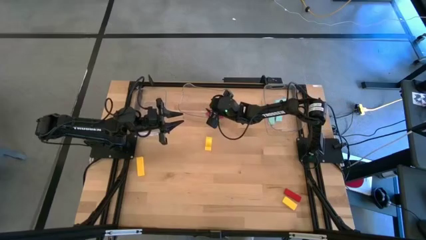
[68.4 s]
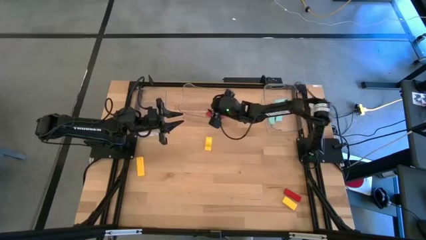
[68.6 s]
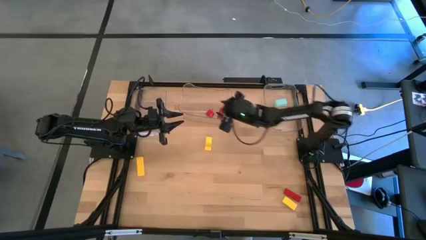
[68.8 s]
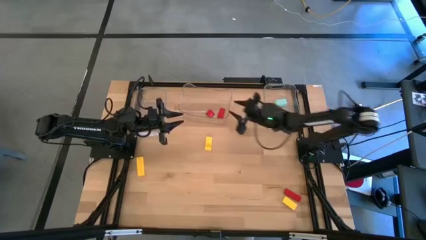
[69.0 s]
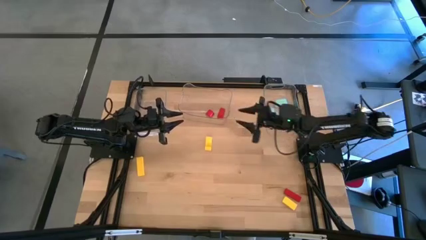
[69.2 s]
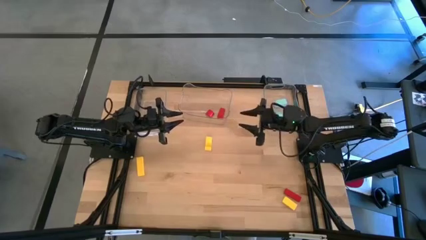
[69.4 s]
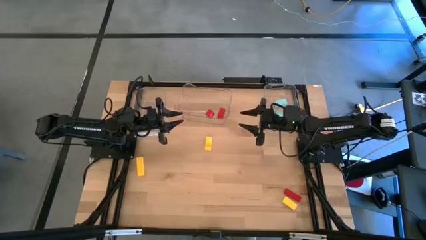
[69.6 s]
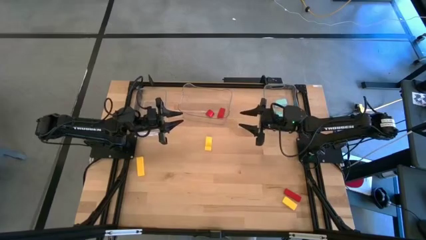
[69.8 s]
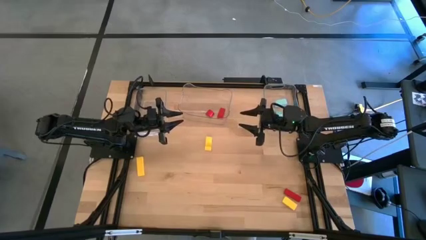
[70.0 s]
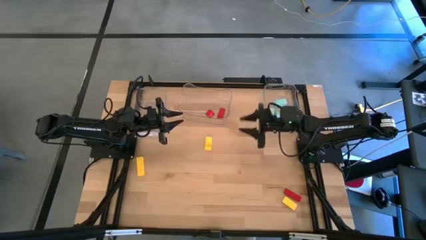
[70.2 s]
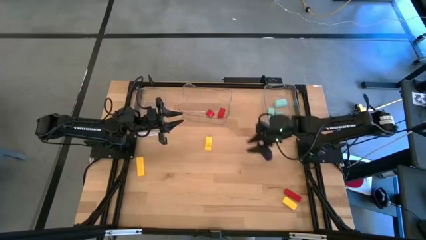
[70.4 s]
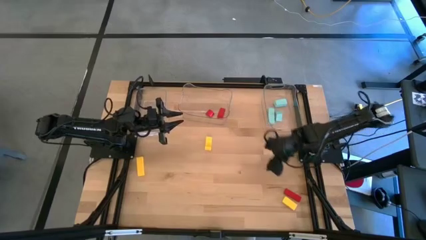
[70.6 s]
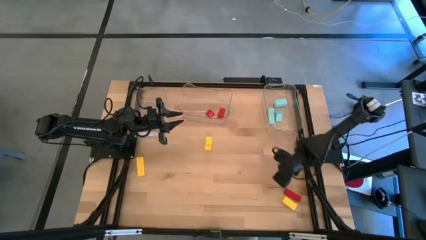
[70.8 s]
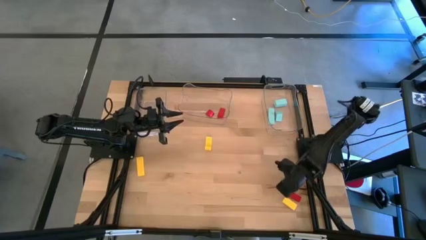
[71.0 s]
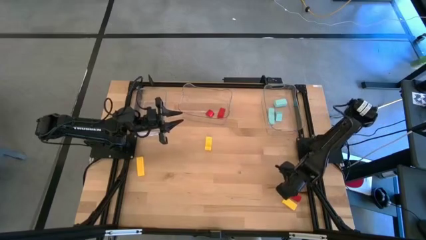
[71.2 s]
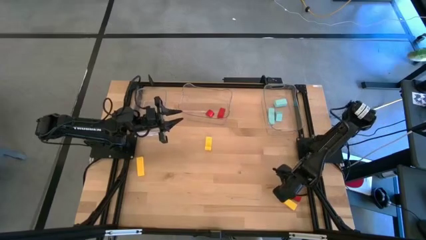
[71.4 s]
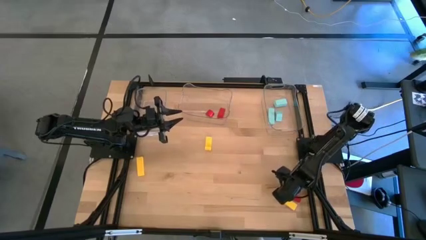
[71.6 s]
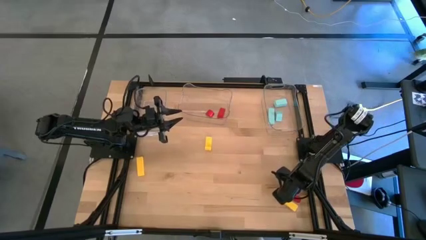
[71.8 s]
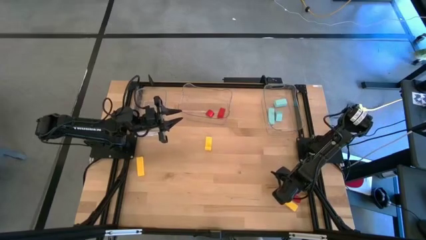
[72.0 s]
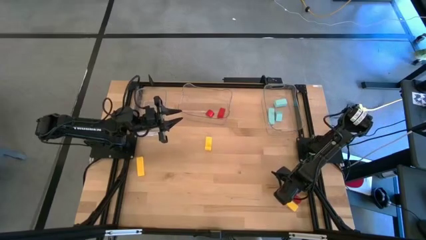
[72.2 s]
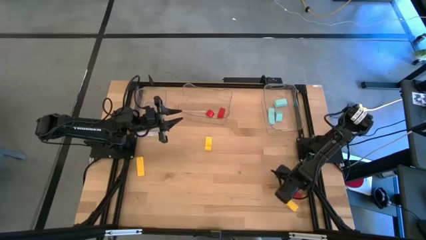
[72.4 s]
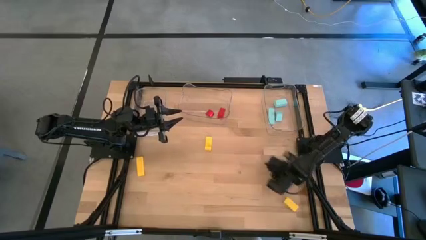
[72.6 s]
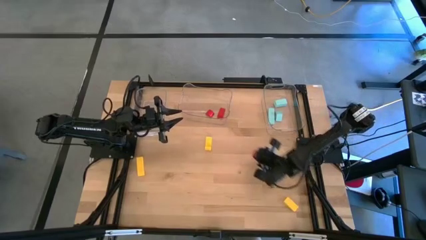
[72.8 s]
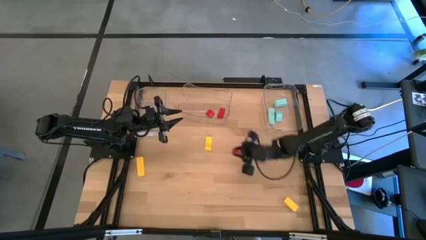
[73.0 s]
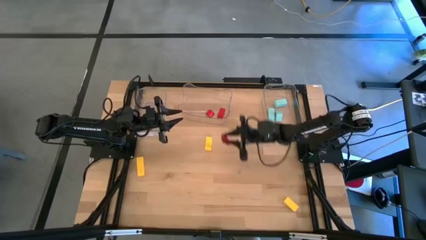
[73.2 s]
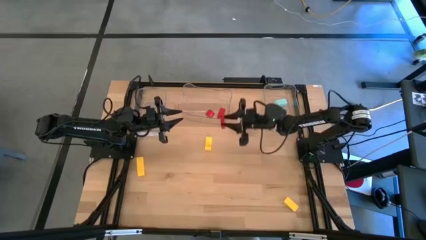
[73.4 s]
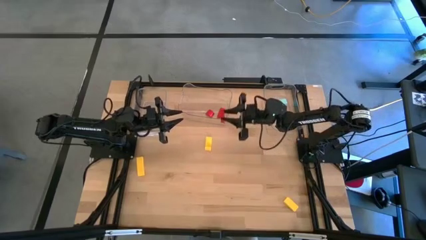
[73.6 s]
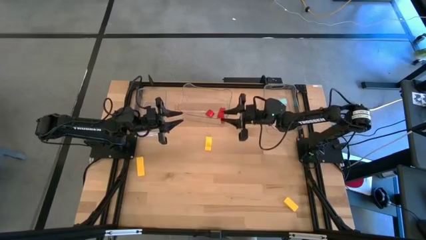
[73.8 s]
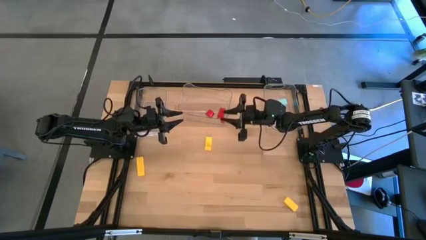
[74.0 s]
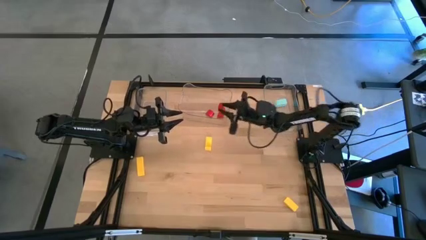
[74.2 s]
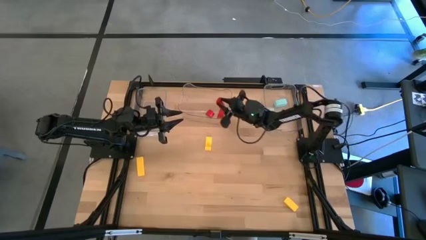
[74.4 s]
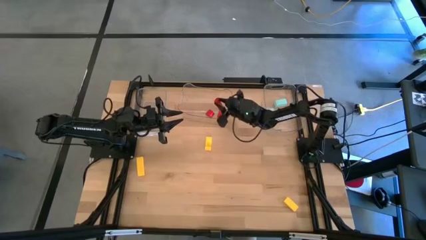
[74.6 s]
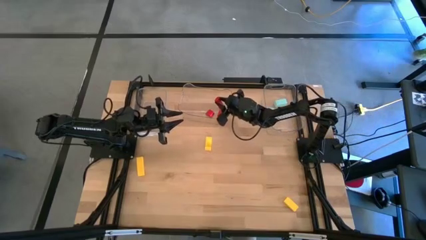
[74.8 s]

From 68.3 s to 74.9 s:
Task: Sort & place blocks by color
Put the red block into the middle transparent bin

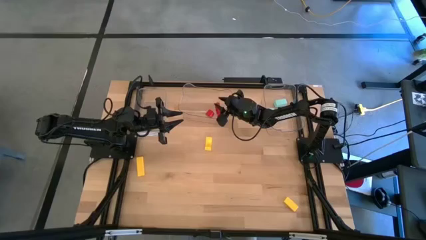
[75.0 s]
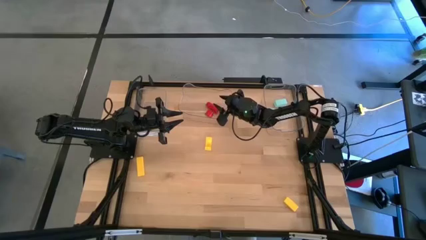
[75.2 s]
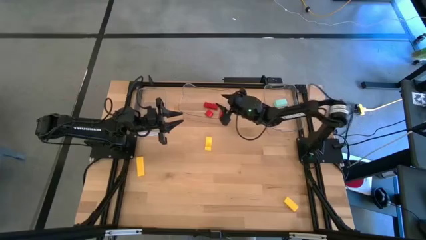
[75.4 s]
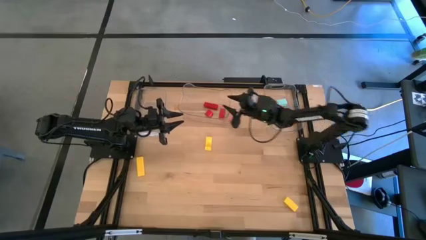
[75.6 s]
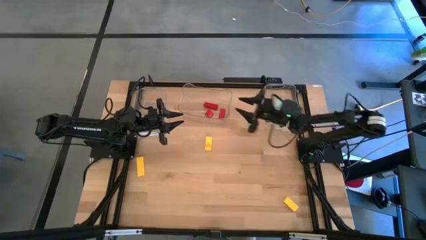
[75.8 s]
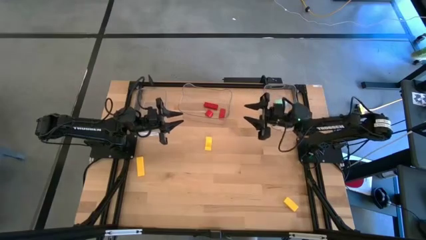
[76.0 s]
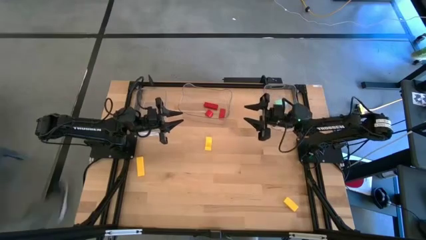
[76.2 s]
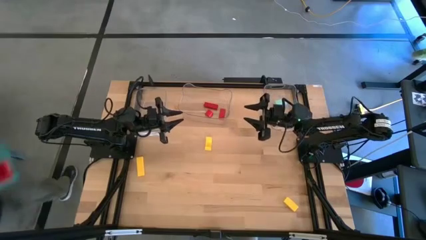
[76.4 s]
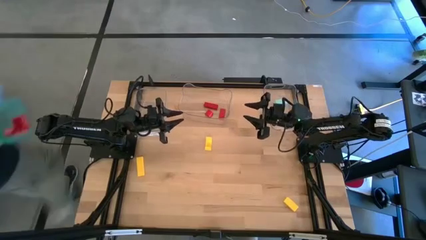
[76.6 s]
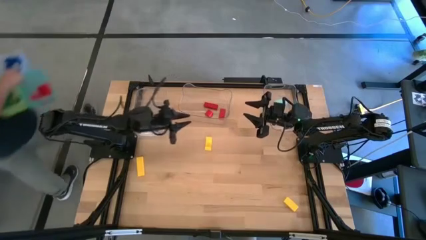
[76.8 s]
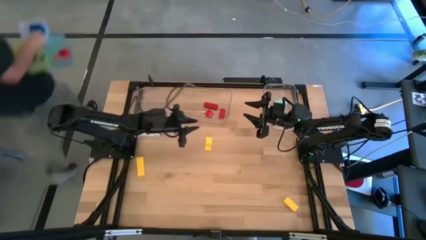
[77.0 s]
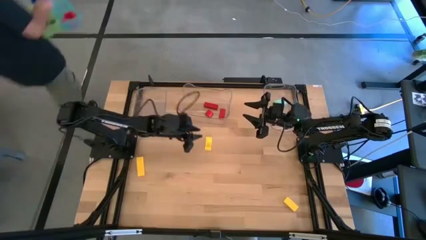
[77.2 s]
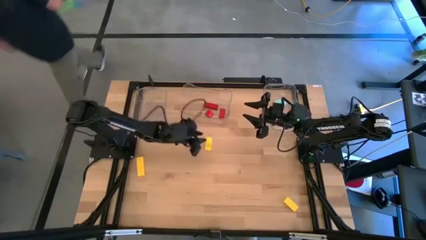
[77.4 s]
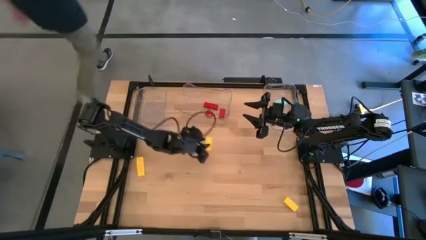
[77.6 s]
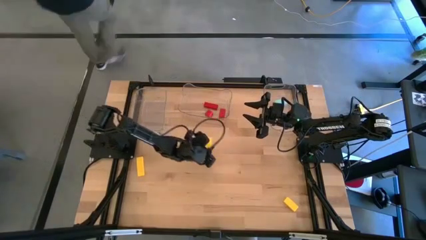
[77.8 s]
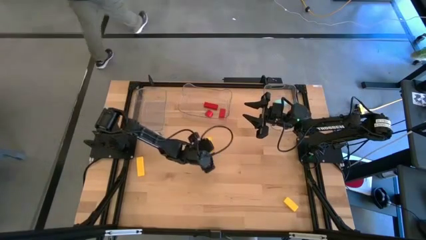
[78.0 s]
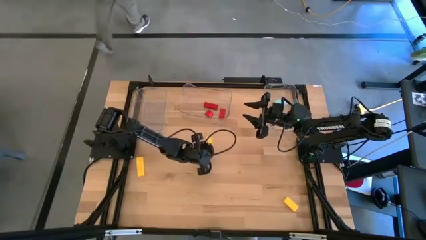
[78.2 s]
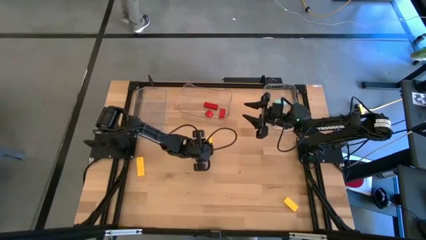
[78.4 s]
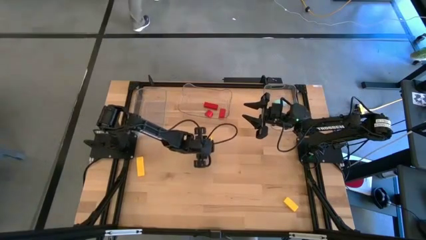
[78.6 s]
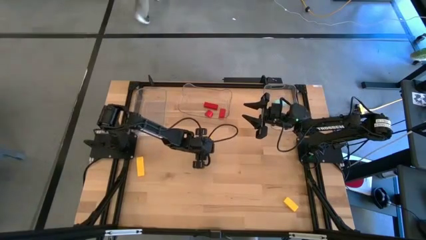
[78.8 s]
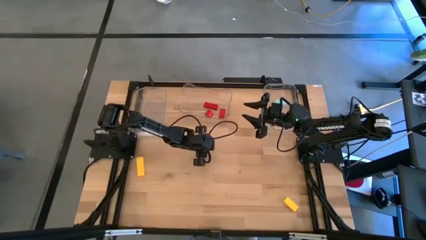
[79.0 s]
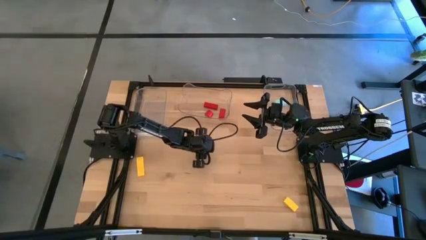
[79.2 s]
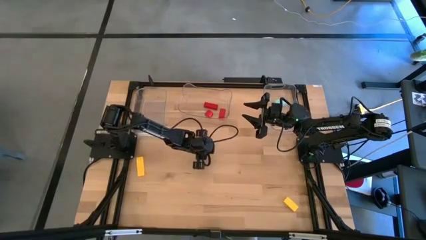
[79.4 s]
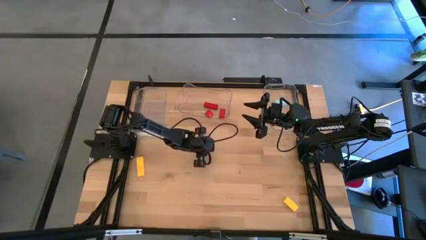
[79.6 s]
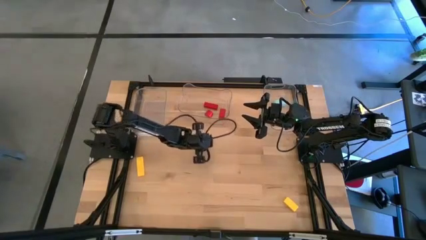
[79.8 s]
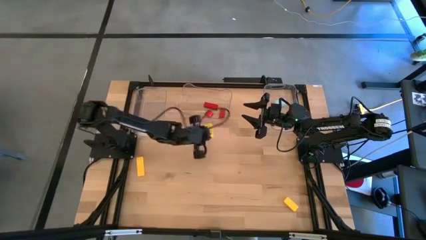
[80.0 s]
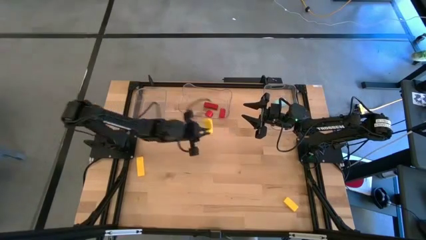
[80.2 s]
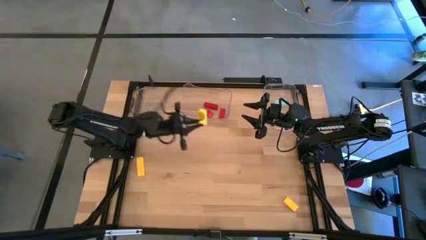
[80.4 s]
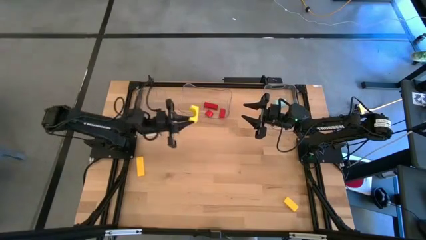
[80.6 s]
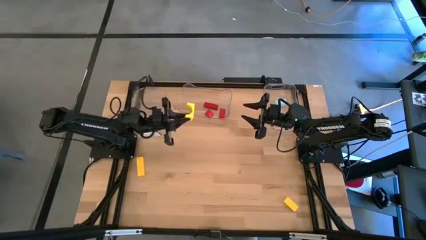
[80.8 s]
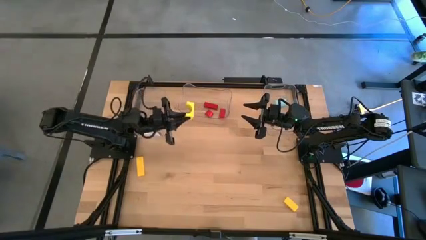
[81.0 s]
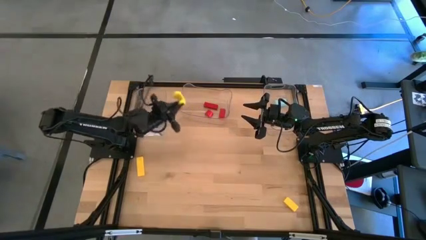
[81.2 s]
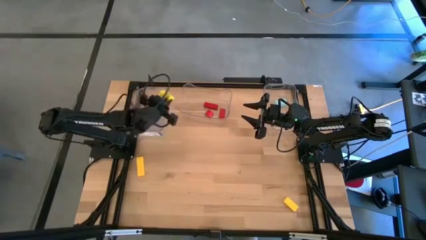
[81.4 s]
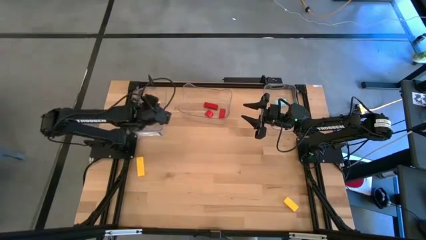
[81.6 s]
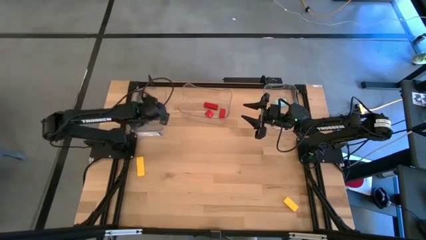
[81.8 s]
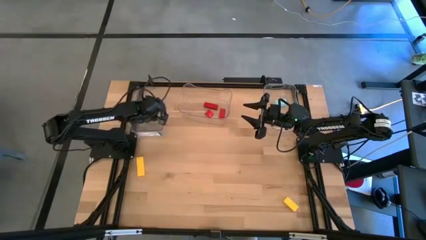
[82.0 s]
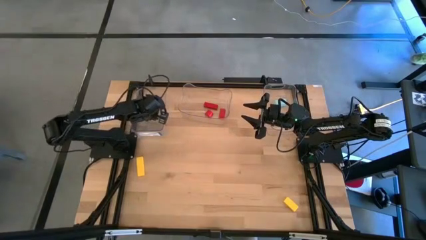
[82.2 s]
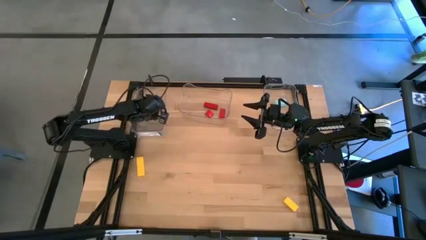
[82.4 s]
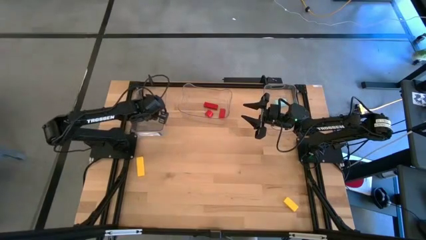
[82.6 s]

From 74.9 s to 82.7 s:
Put the top middle yellow block into the left transparent bin

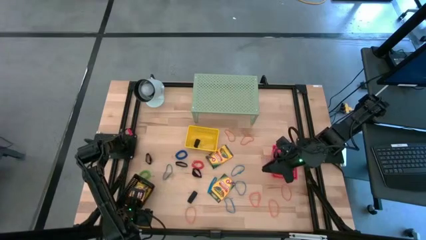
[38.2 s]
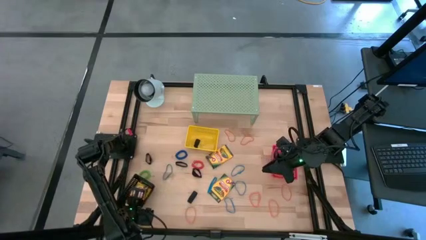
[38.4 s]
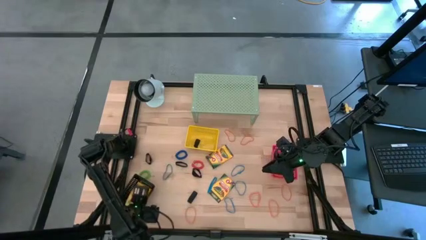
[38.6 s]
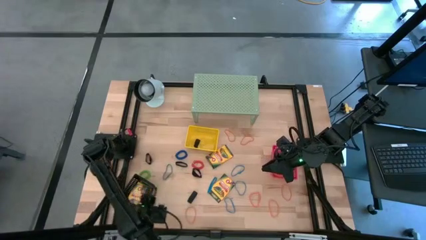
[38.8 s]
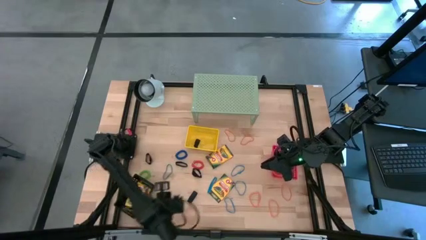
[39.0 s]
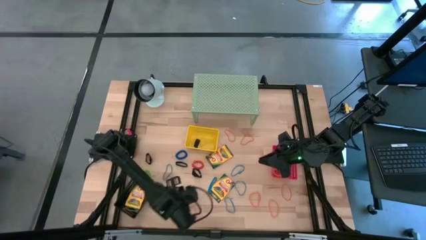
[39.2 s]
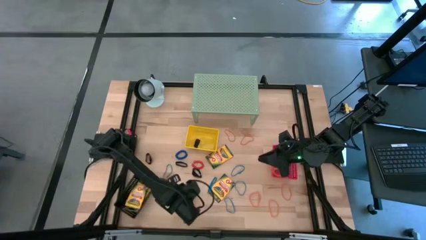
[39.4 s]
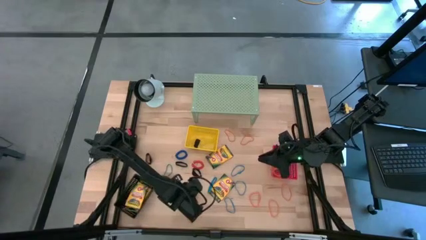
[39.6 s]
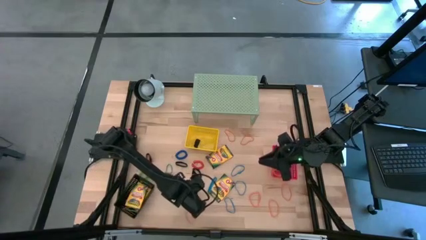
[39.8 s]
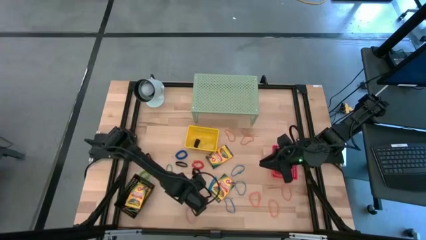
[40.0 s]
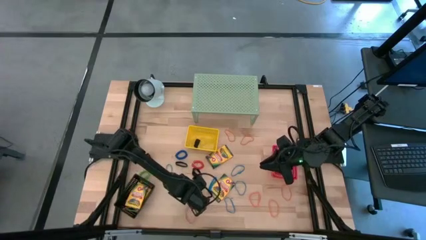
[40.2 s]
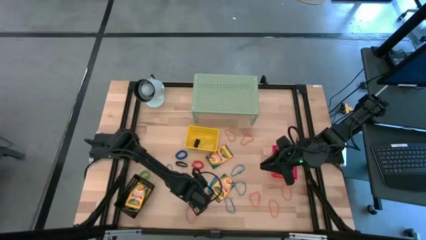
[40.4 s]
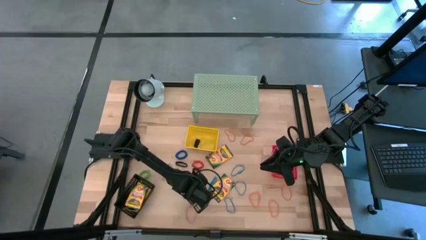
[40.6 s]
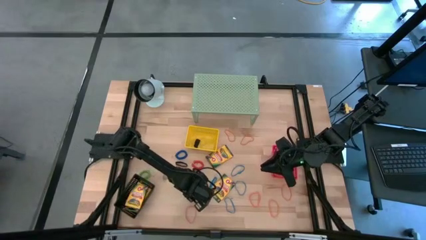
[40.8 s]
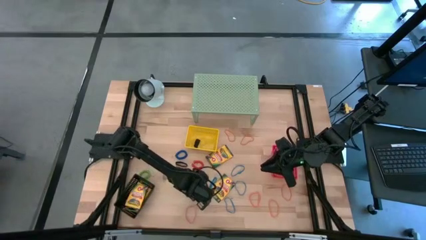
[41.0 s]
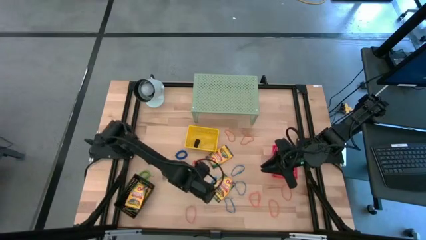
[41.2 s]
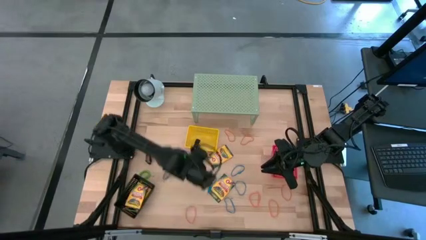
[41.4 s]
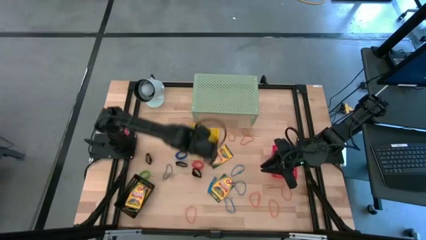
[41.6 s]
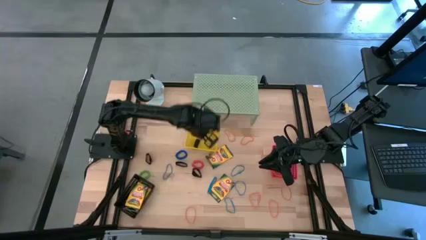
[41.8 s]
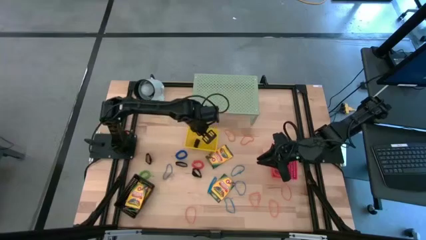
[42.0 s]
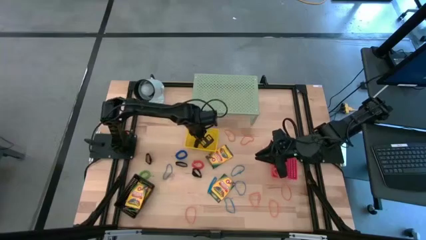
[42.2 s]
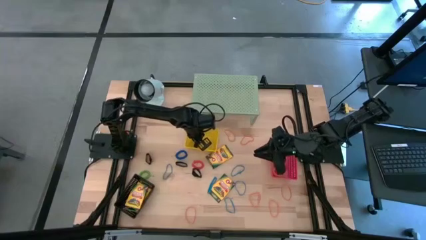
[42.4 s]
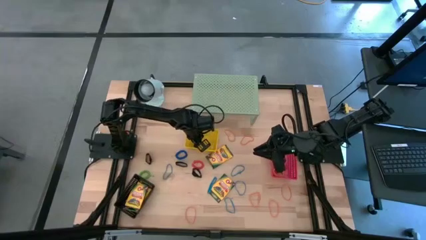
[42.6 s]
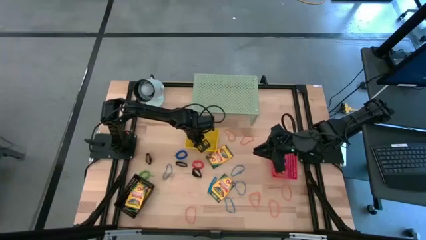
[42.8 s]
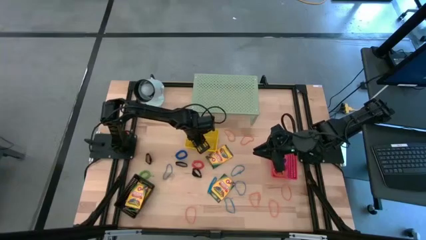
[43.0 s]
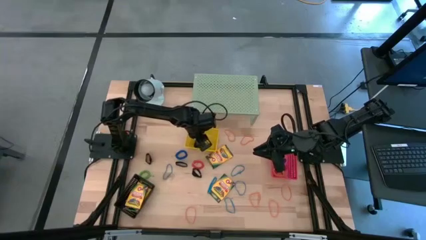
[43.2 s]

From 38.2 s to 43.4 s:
Task: Pick & Place Office Desk Supplies
Put the black rubber band into the yellow bin
